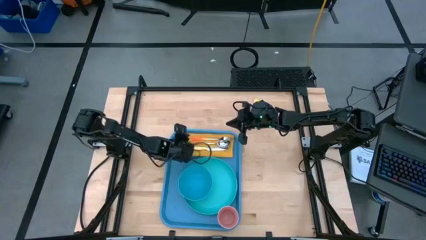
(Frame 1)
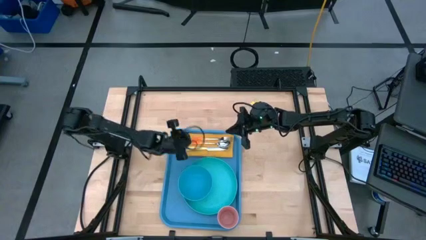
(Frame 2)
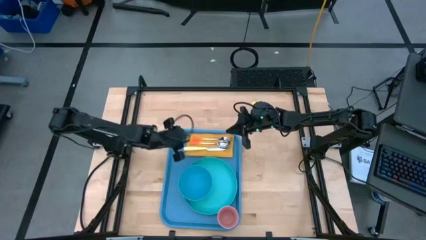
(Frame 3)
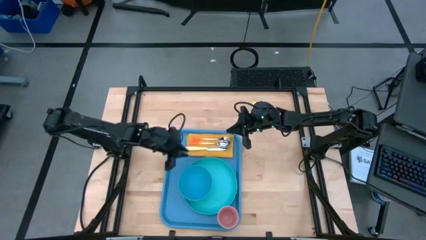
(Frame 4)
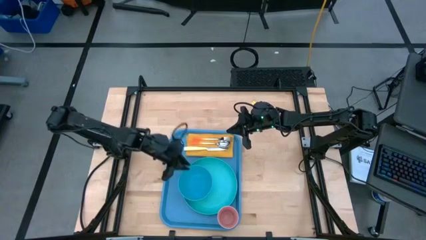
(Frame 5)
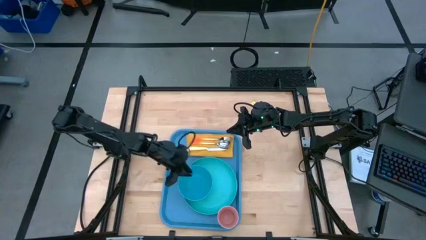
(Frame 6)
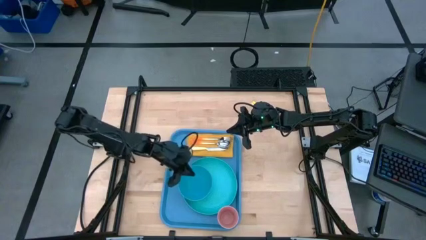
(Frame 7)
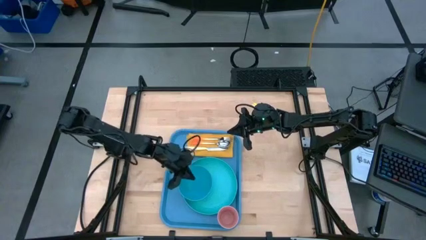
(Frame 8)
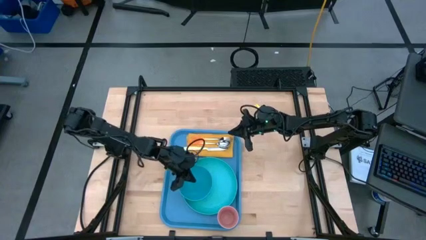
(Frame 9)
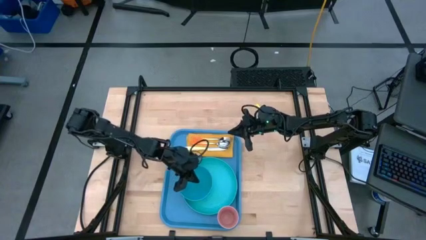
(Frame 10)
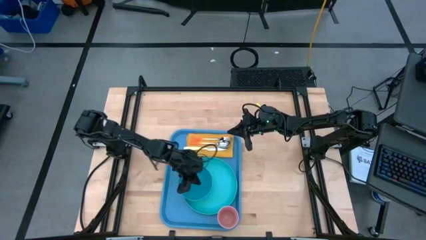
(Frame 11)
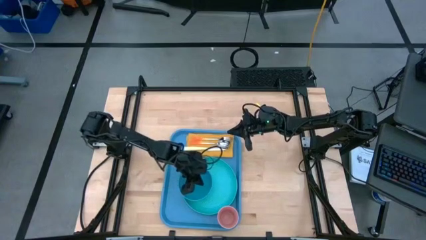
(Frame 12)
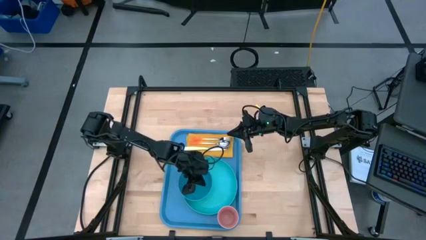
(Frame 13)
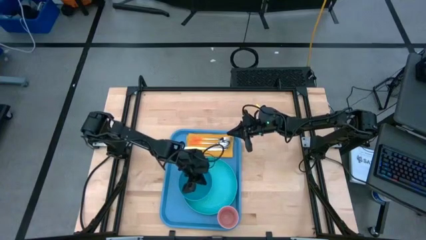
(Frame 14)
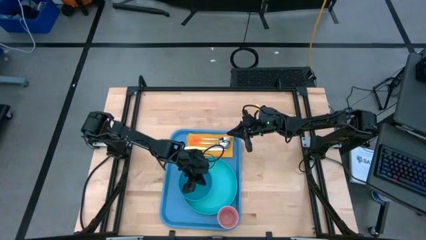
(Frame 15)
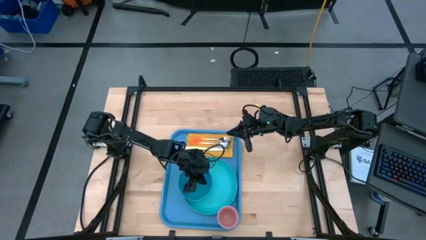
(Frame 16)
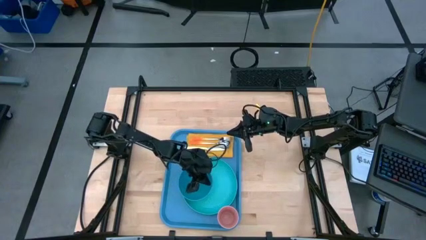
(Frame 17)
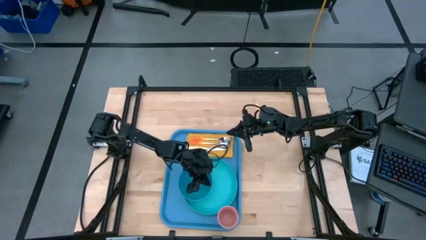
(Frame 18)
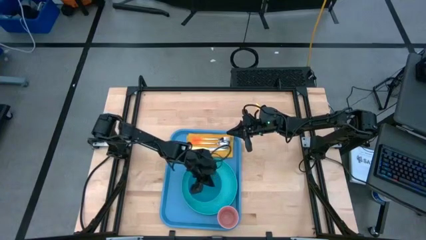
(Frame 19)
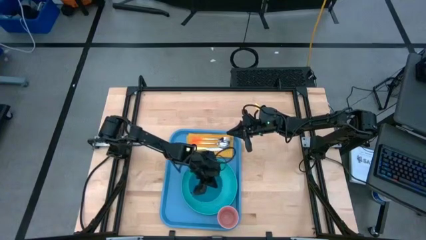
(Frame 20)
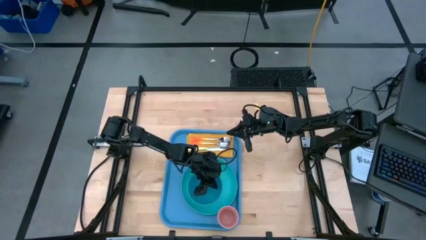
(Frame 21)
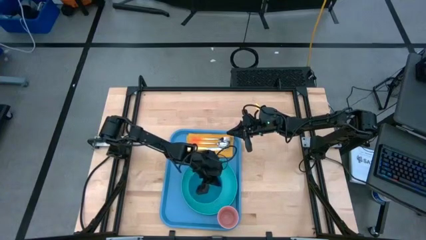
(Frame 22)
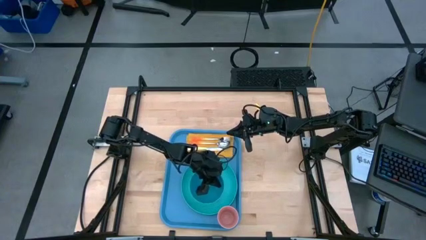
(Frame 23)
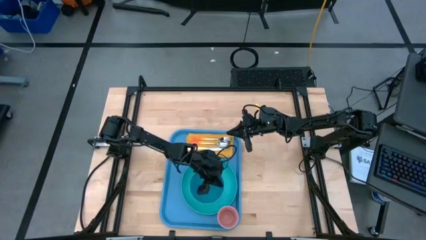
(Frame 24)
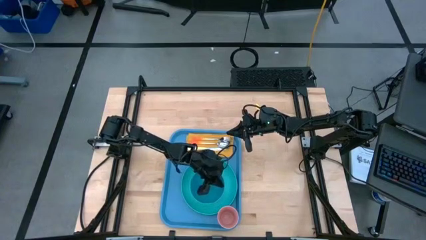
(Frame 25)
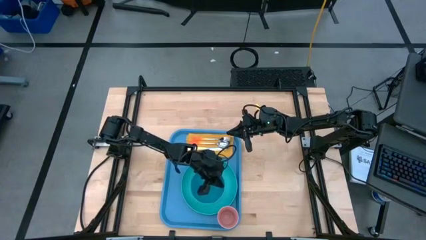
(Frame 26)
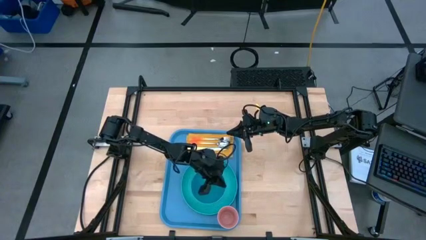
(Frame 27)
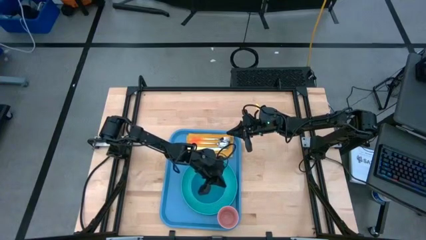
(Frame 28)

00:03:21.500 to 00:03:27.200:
Task: Set up tray
Adjust the blue bowl on the plate

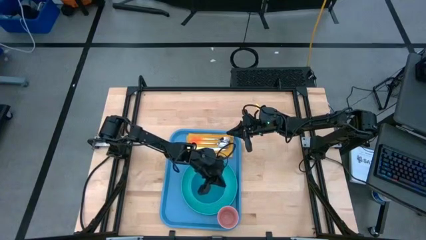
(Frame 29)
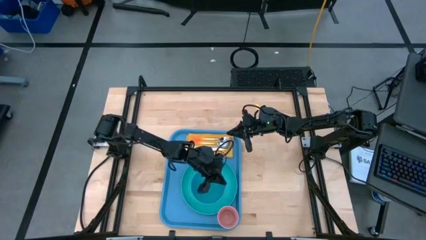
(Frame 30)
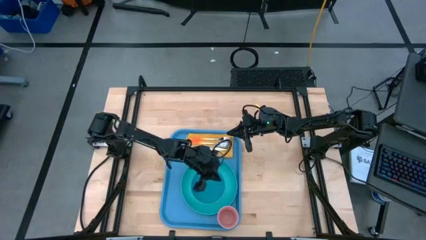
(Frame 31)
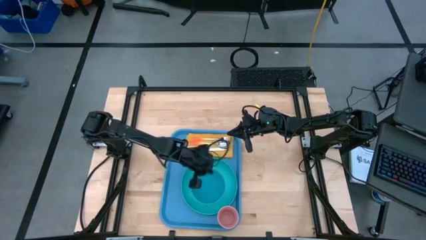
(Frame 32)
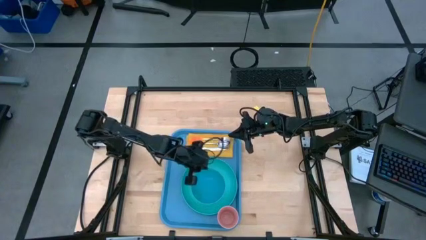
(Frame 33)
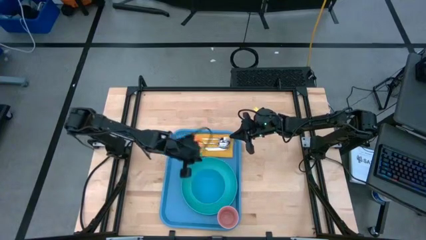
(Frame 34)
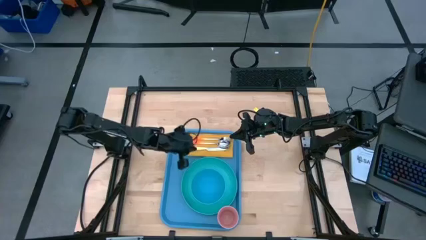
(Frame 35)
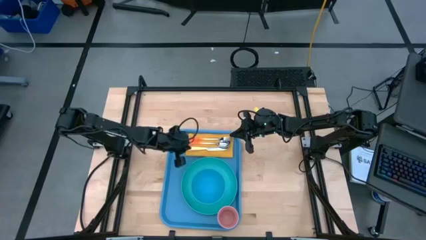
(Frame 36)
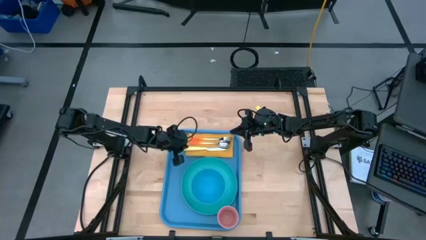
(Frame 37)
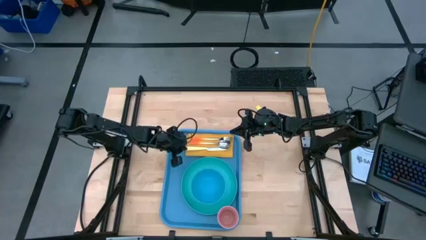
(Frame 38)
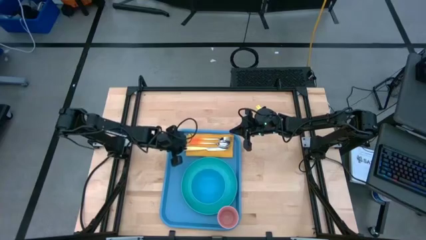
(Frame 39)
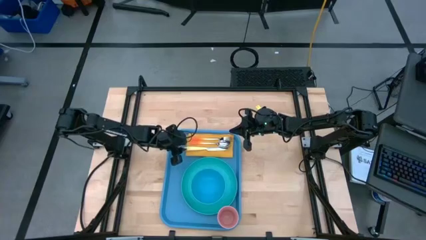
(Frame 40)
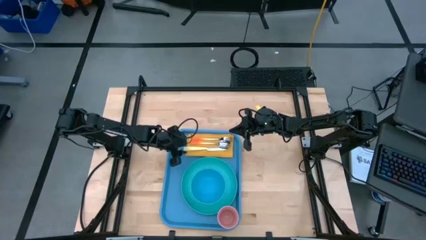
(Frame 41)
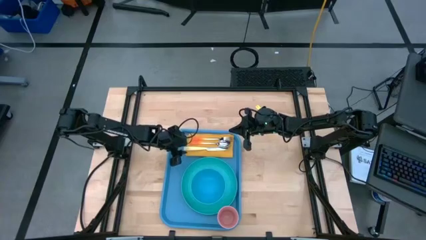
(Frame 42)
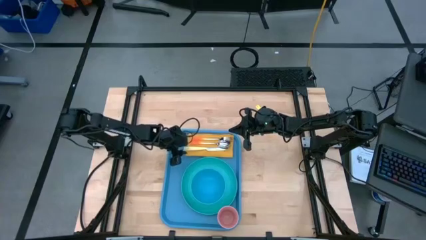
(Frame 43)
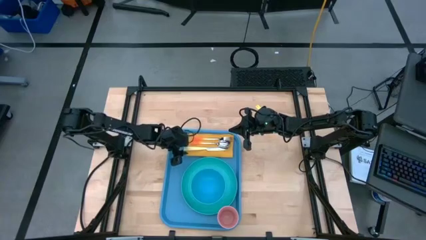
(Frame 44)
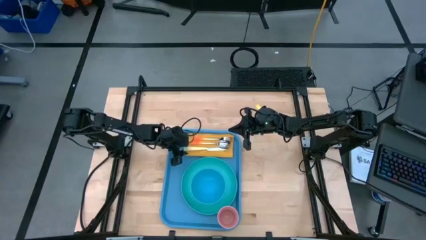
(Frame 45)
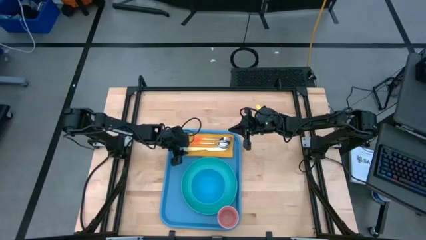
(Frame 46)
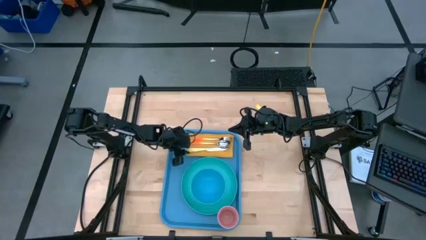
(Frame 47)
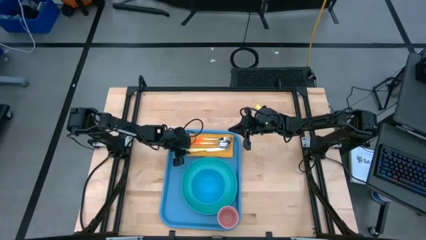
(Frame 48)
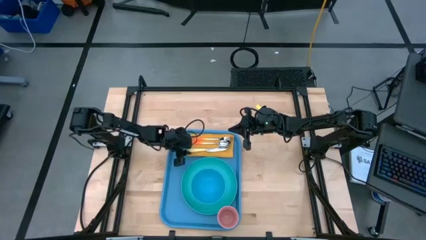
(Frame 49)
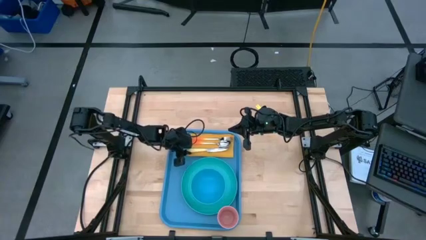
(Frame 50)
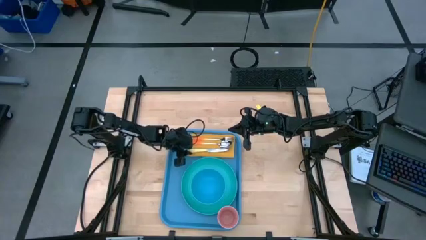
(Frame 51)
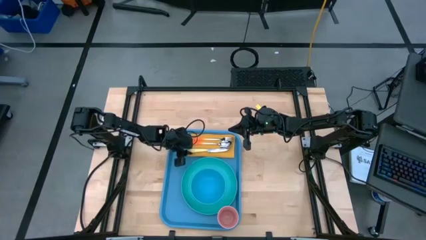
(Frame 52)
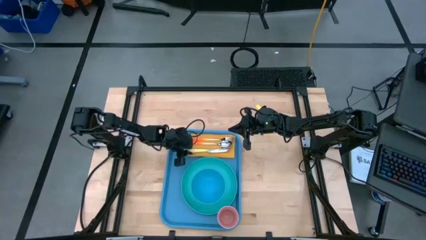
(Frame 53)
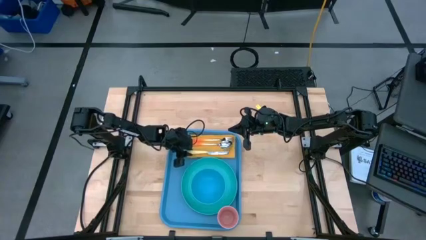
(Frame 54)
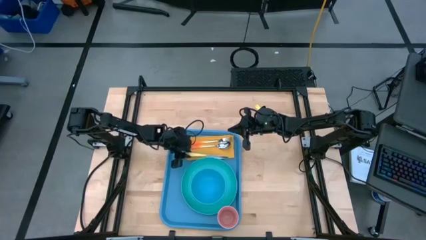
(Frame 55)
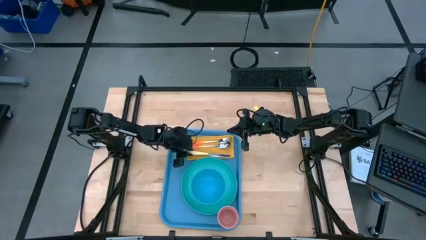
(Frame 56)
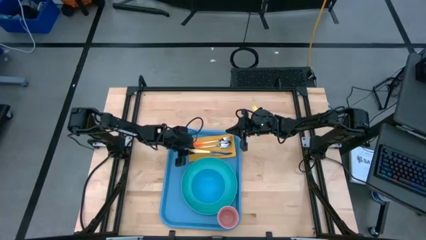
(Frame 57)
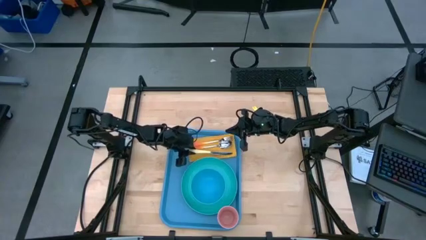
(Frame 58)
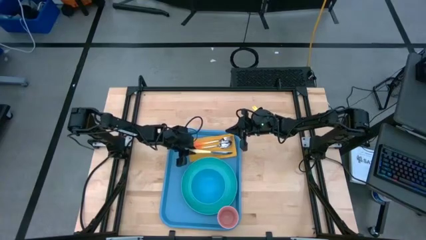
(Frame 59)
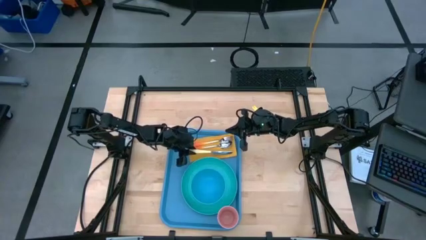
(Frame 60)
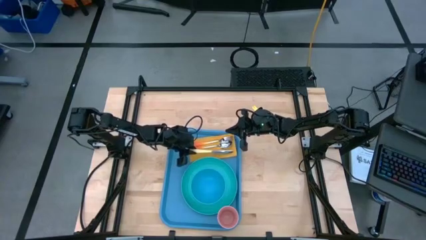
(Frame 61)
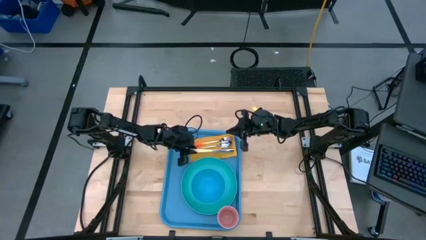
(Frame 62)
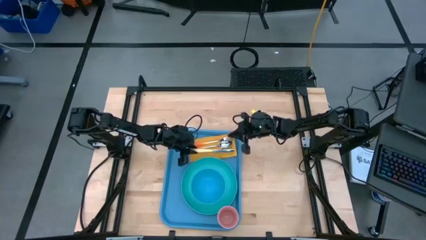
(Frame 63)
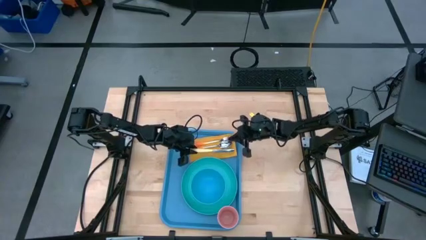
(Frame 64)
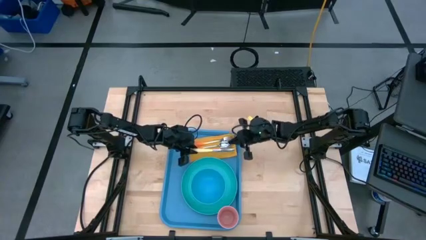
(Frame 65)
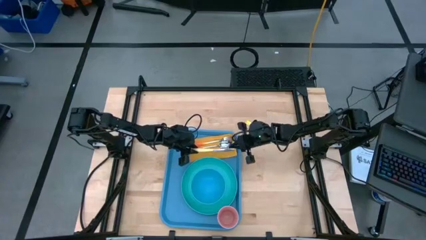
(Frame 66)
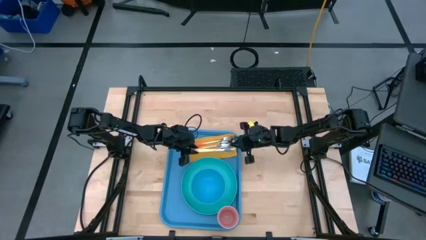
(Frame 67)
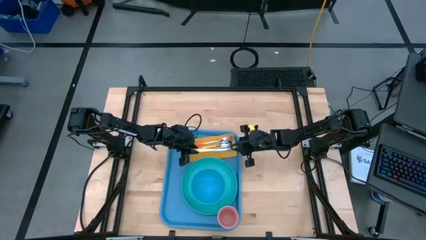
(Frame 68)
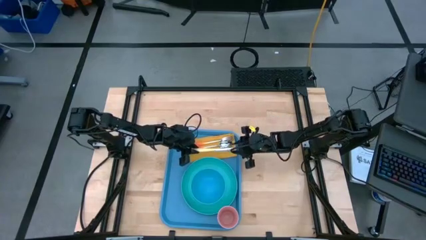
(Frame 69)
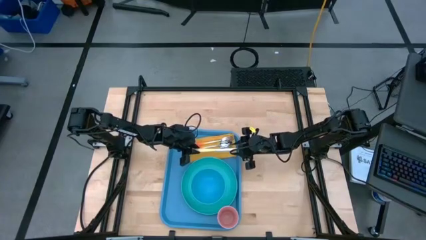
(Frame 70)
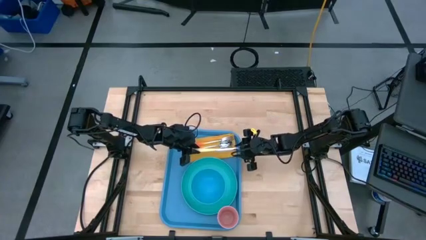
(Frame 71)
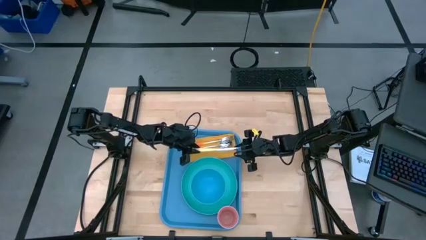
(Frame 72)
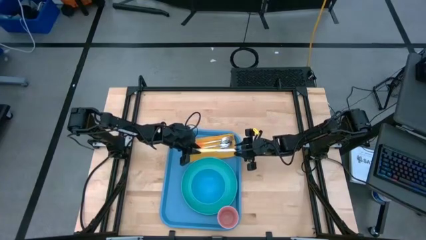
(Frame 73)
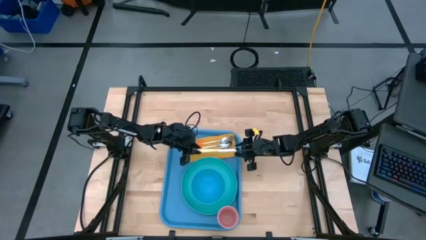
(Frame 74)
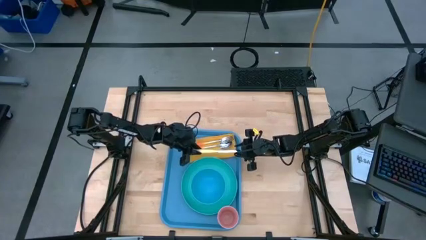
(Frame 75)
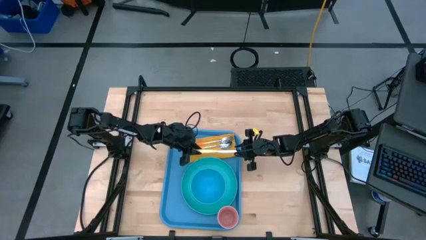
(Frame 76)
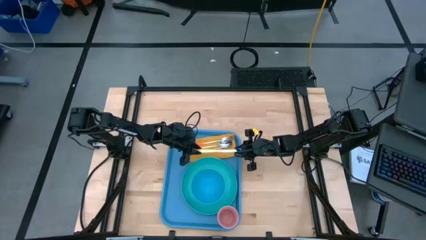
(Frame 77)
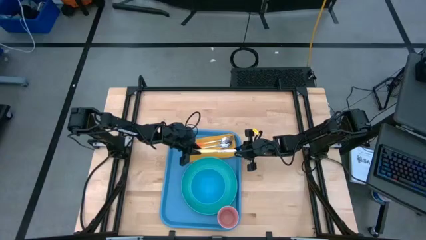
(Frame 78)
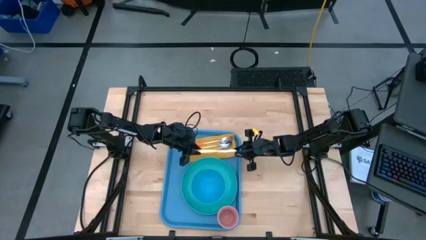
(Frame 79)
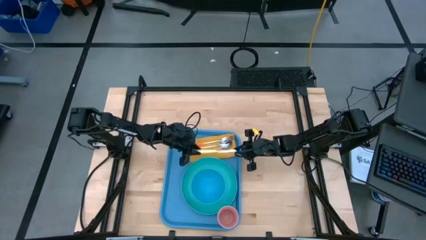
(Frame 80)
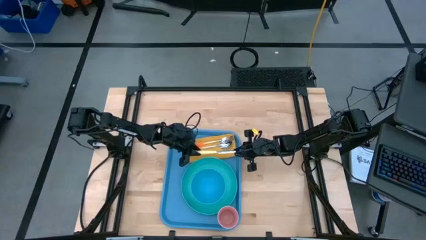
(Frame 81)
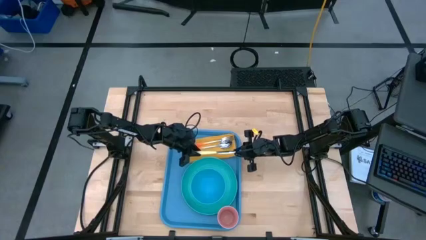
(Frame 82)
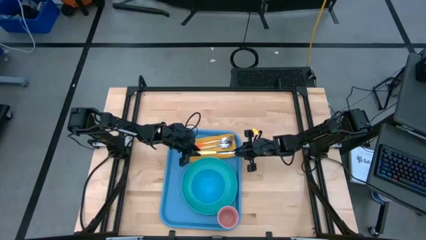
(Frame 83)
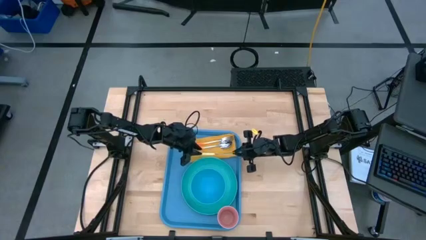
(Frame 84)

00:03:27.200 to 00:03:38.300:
Adjust the light green knife on the orange napkin
